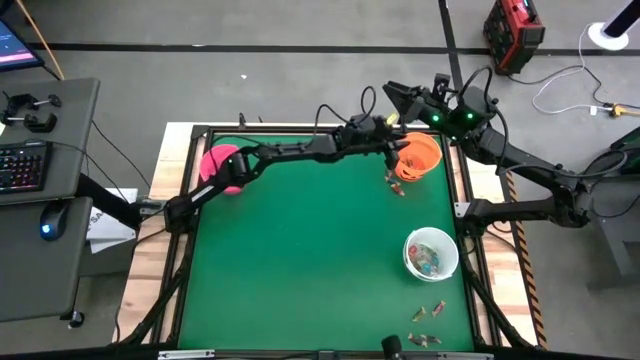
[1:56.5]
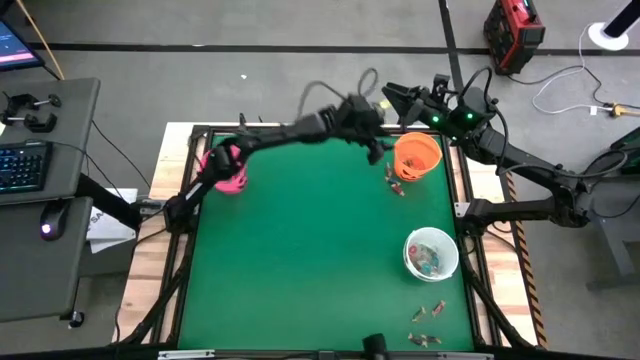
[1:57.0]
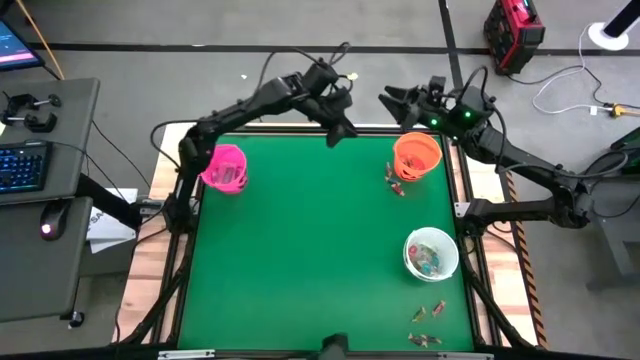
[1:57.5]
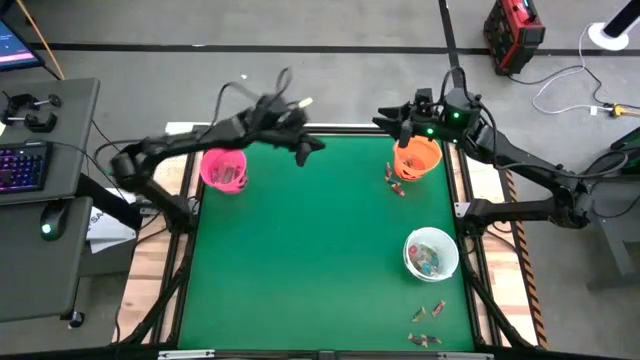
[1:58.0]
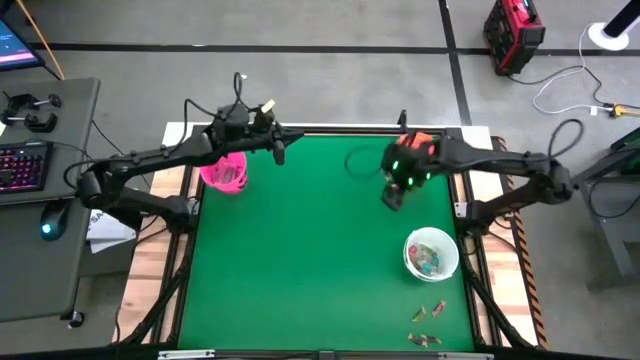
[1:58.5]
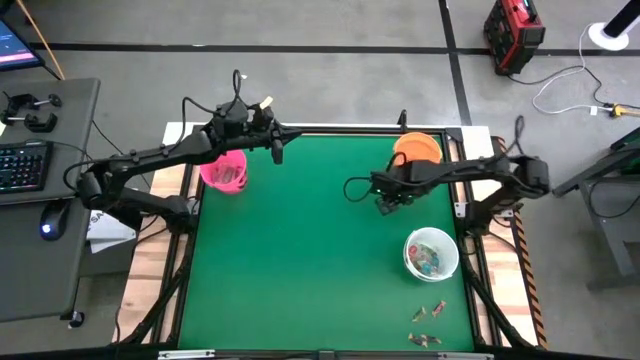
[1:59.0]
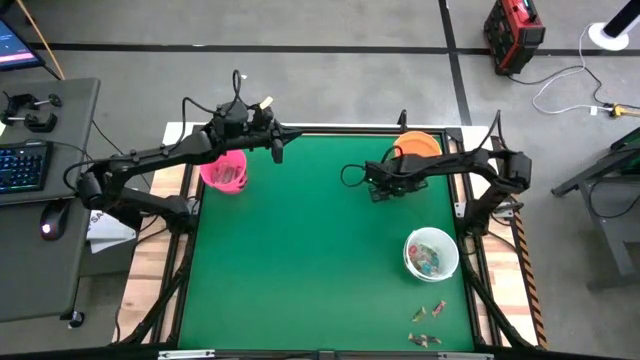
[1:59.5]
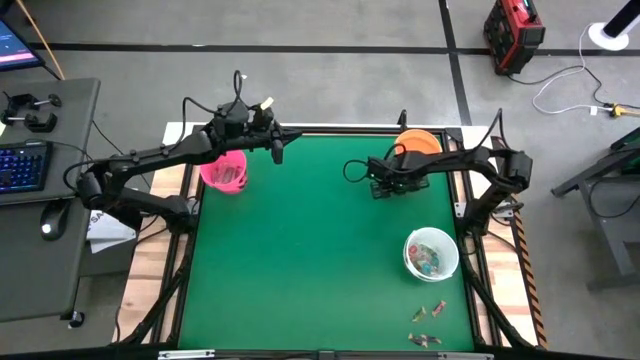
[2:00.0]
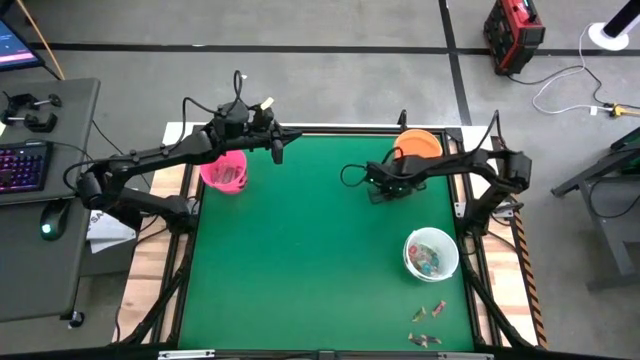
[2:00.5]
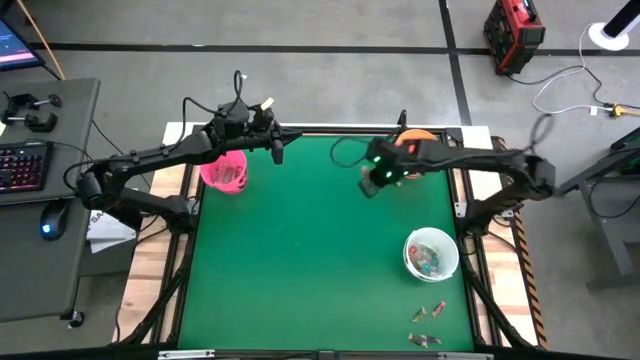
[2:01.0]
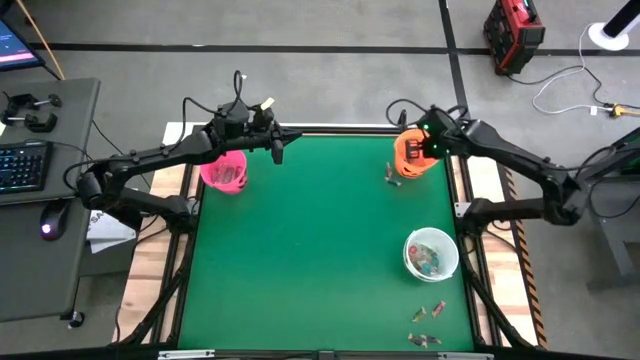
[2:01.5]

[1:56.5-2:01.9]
Task: Sort candy by brand, put in halloween buckets
Put the pink candy into the orange bucket

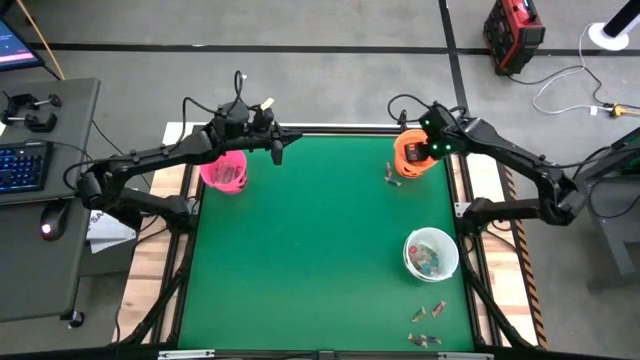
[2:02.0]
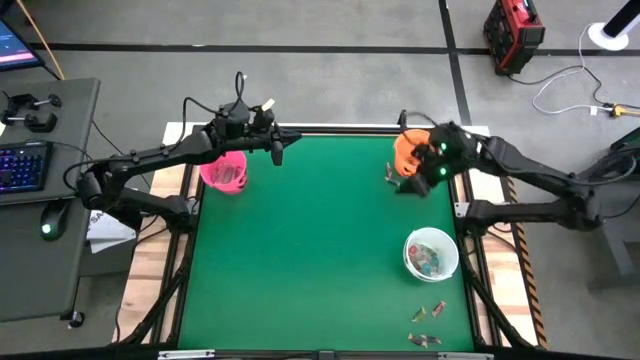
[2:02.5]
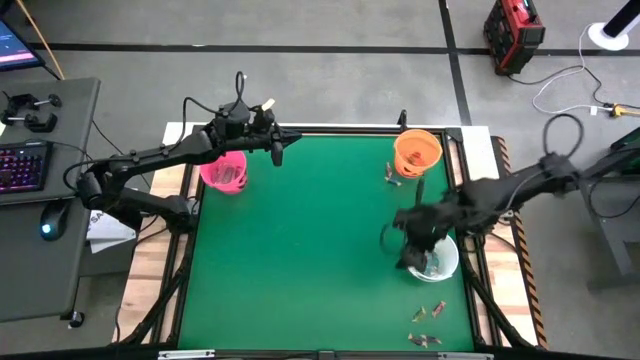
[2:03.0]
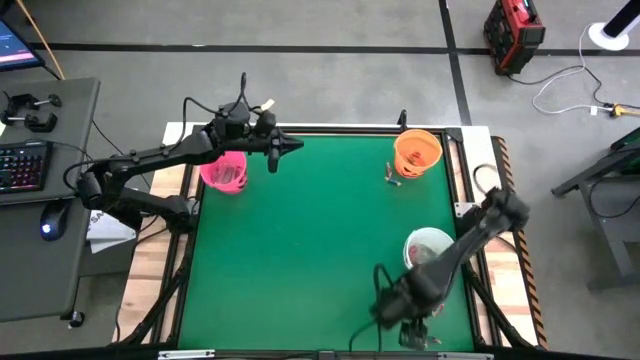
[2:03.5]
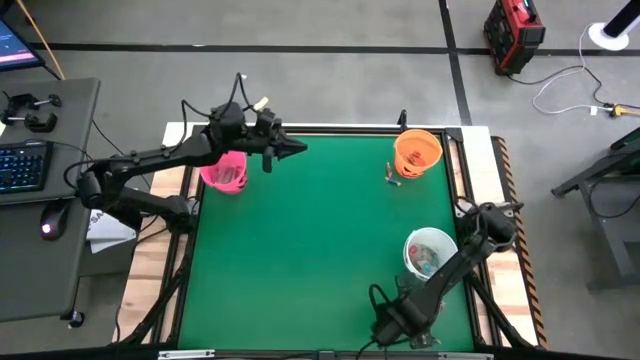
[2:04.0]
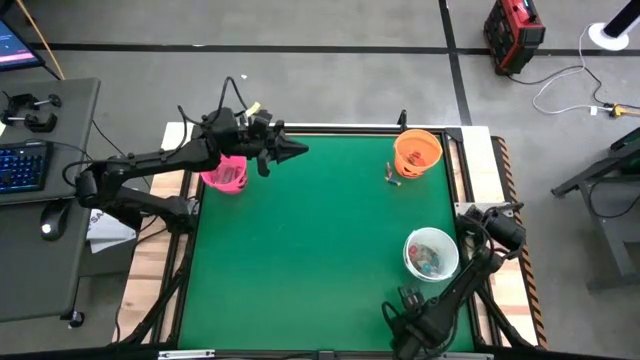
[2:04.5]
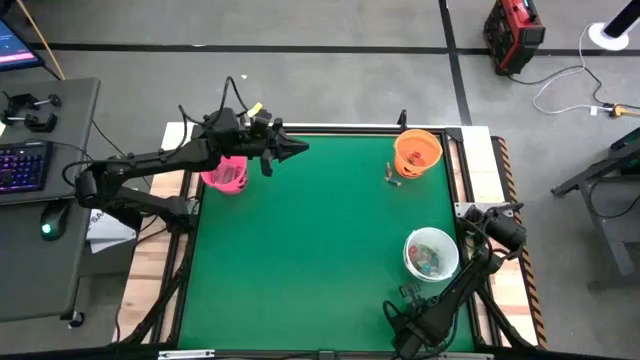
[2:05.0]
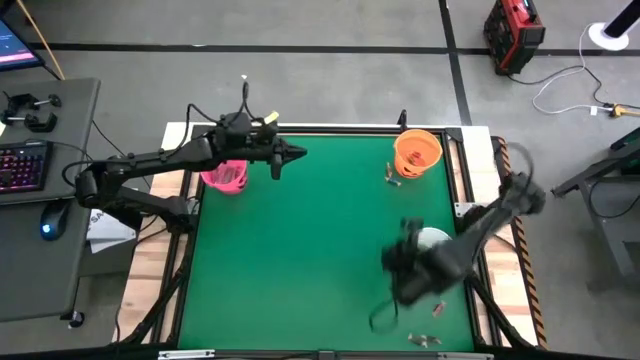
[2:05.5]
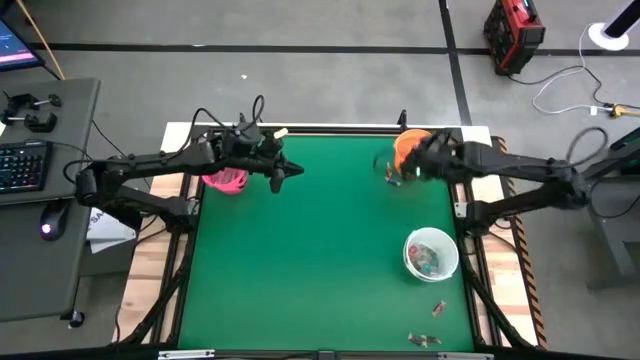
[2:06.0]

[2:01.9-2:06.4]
Put the green candy into the orange bucket

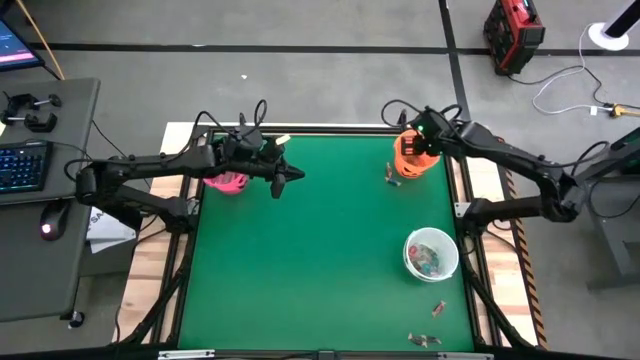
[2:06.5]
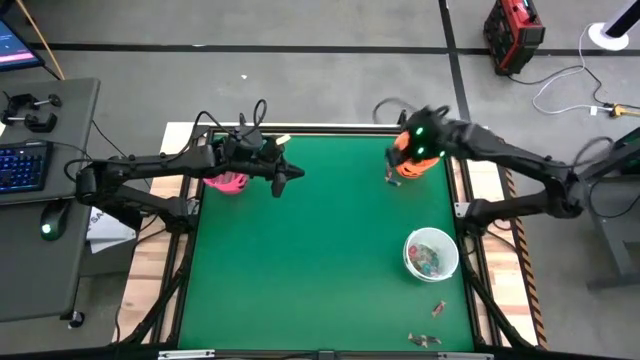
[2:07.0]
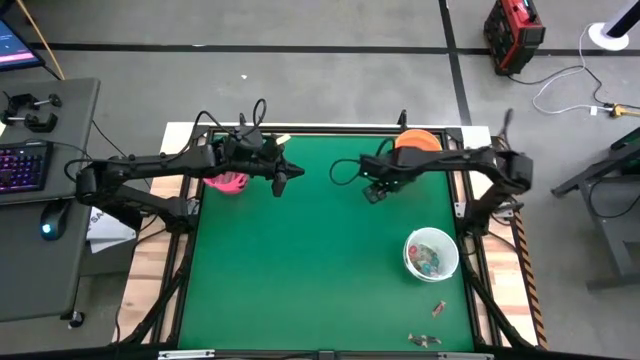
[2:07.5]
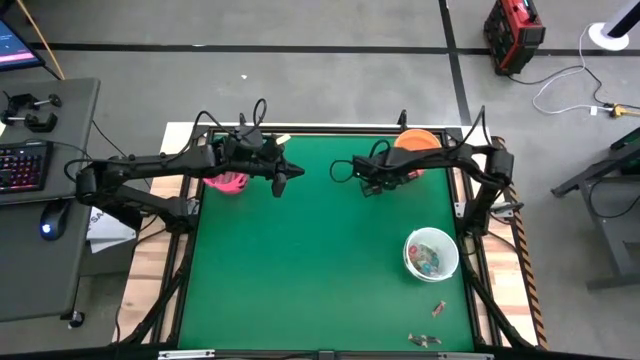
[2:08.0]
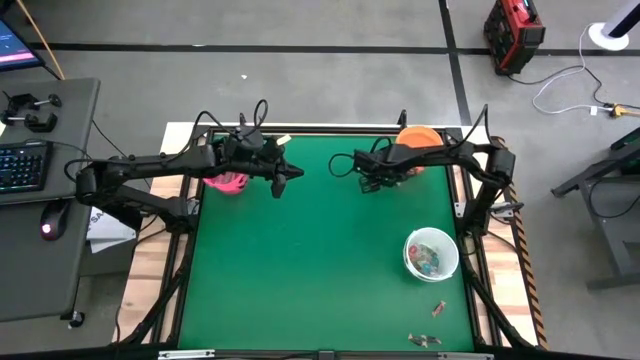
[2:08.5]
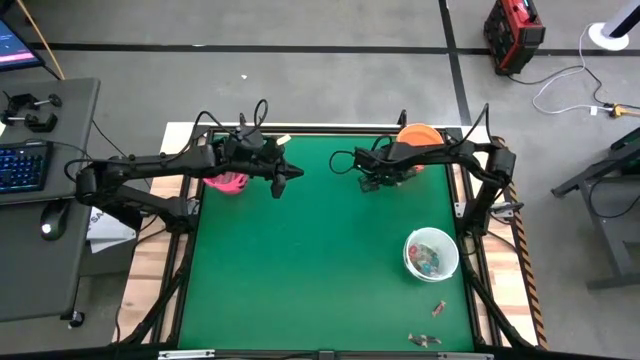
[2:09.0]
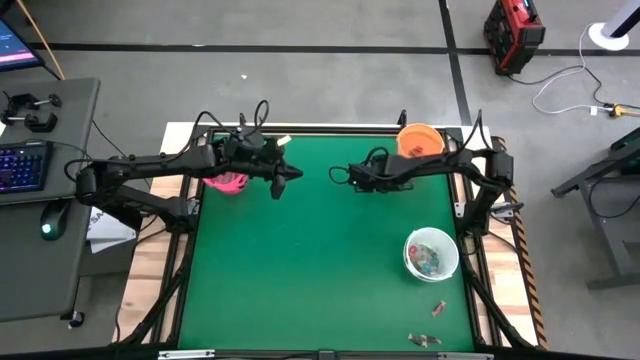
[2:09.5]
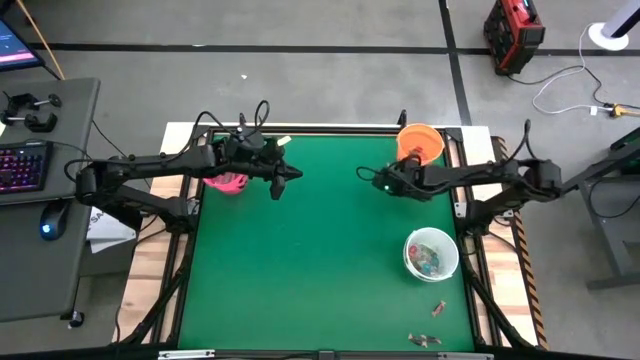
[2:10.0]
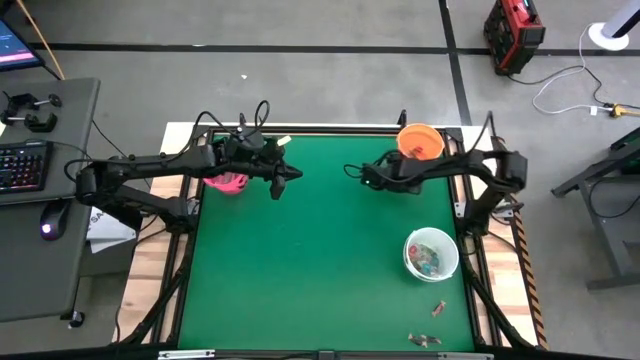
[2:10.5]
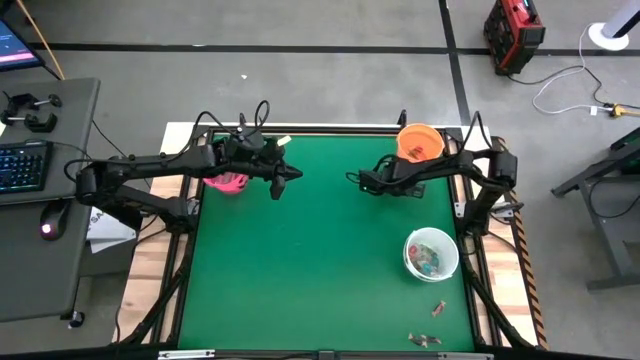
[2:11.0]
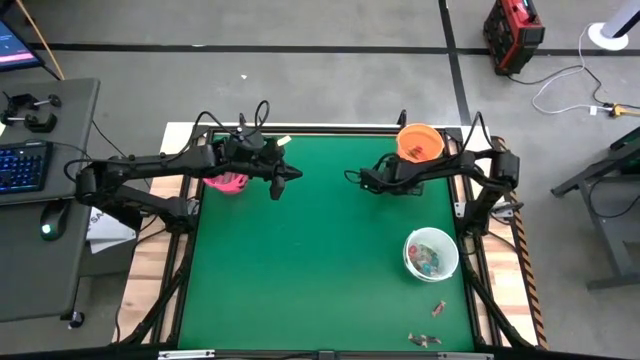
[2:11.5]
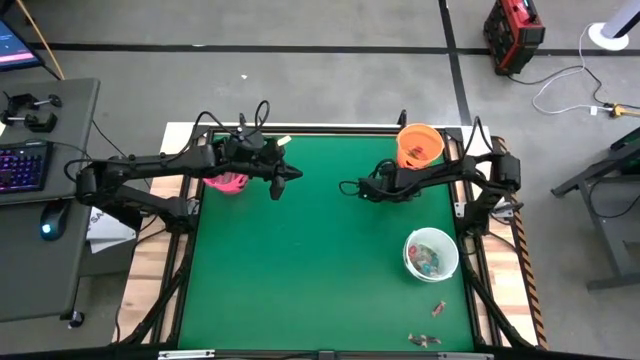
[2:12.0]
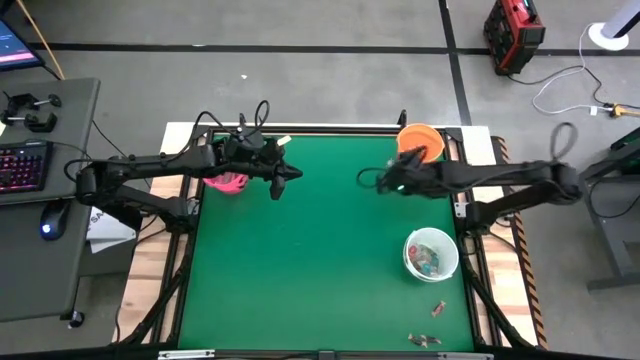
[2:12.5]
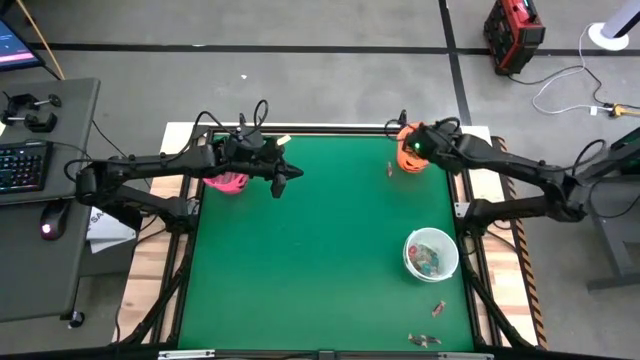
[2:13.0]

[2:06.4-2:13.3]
Put the blue candy into the orange bucket

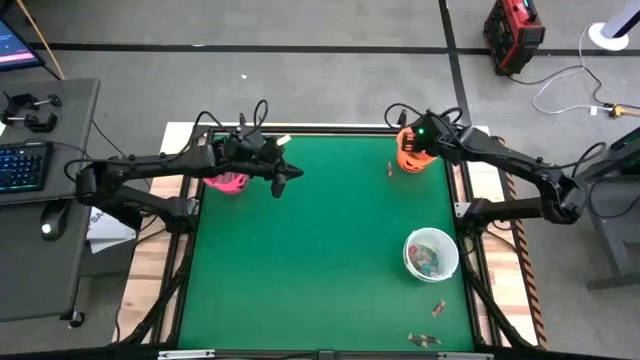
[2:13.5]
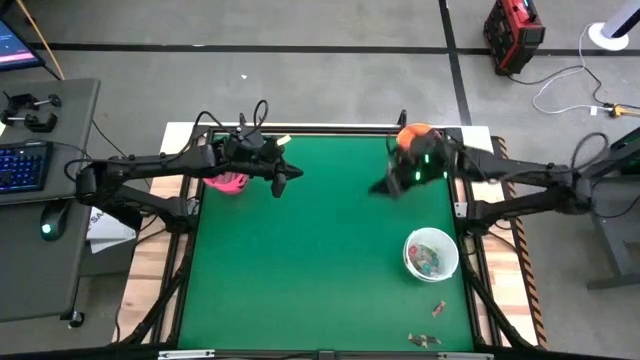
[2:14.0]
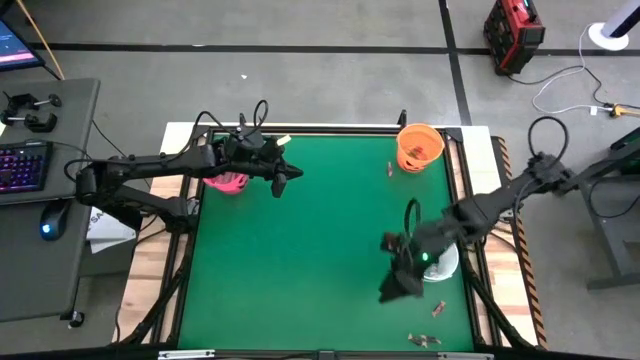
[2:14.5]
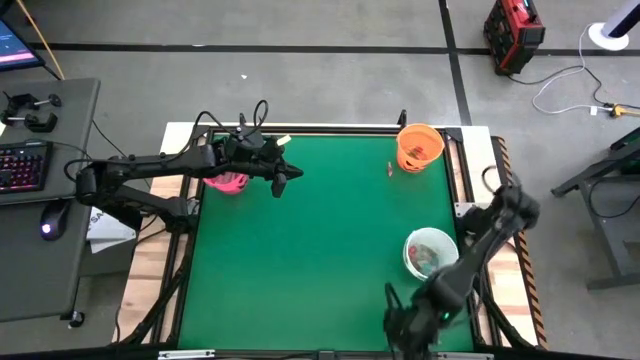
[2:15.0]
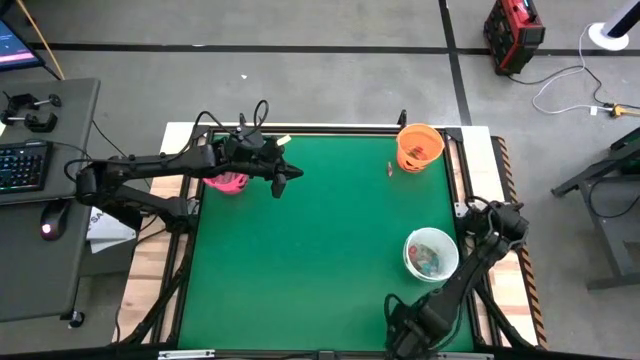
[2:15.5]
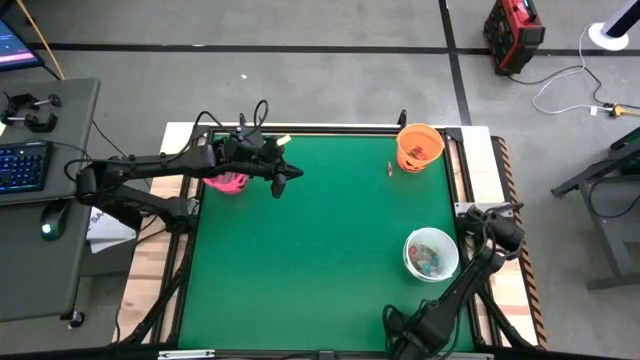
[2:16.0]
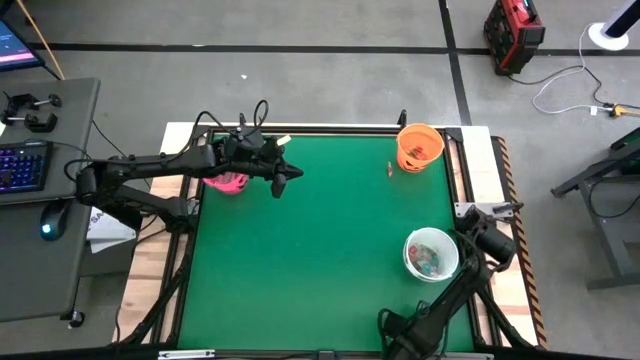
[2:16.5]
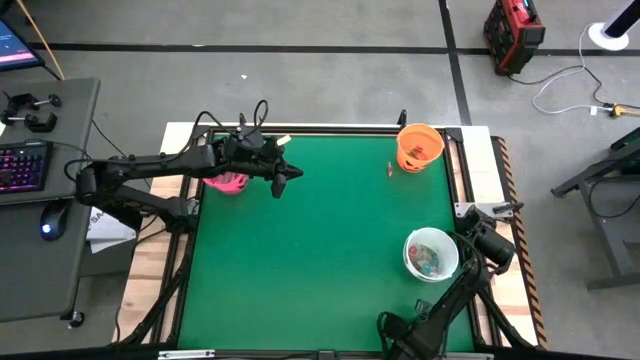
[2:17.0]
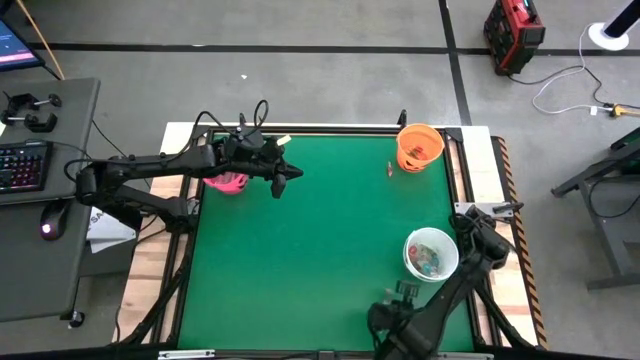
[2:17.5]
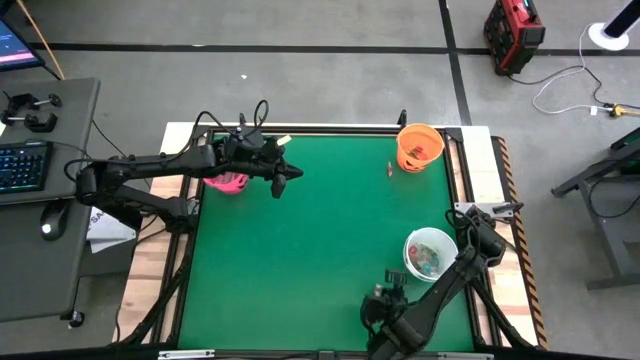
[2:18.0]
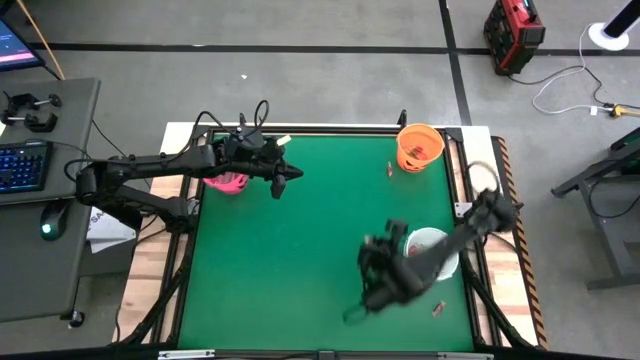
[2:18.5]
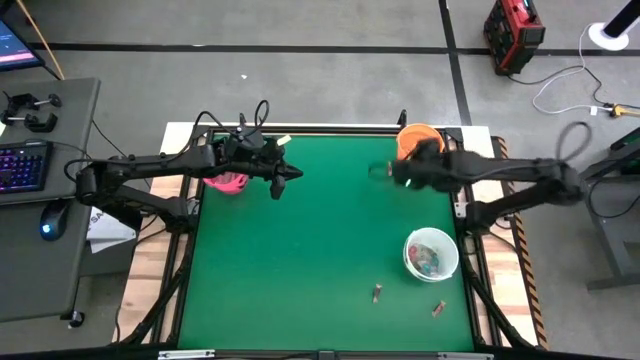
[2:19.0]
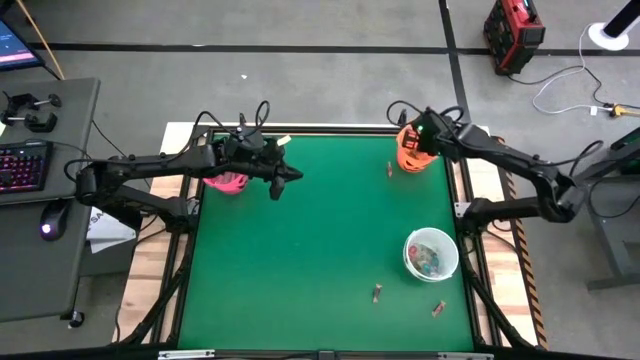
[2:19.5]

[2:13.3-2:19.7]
Put the violet candy into the orange bucket
